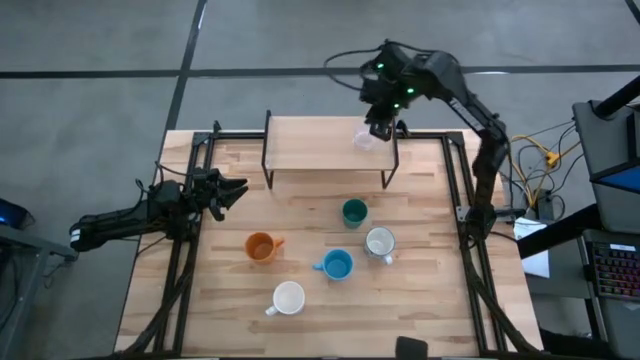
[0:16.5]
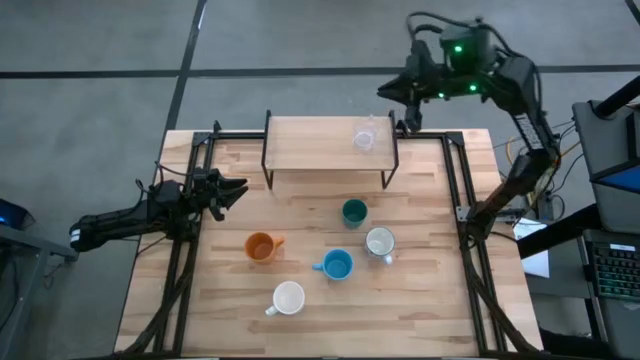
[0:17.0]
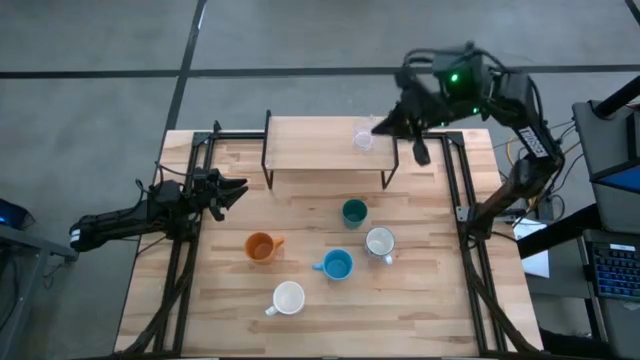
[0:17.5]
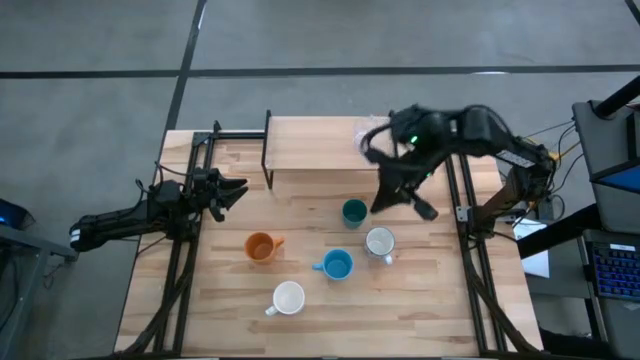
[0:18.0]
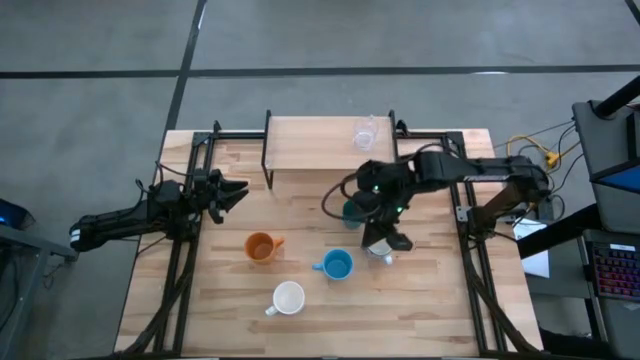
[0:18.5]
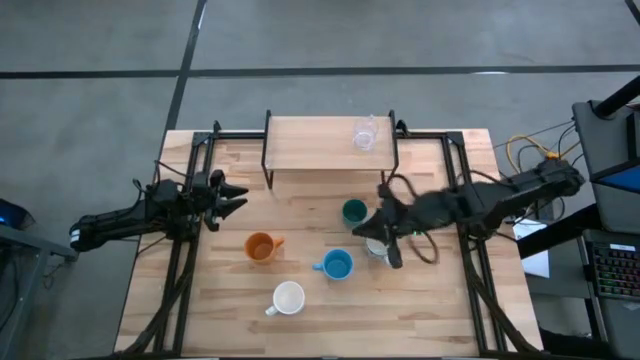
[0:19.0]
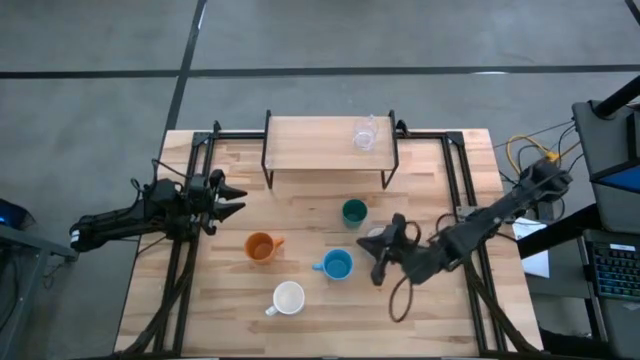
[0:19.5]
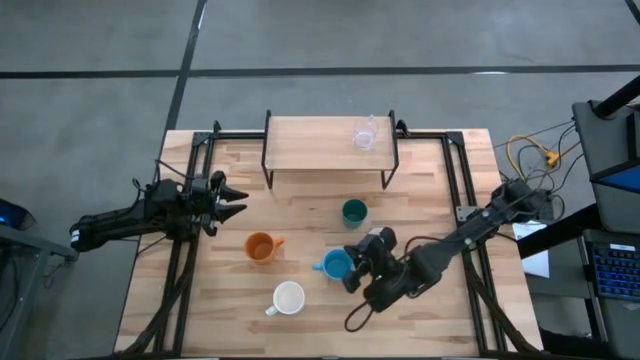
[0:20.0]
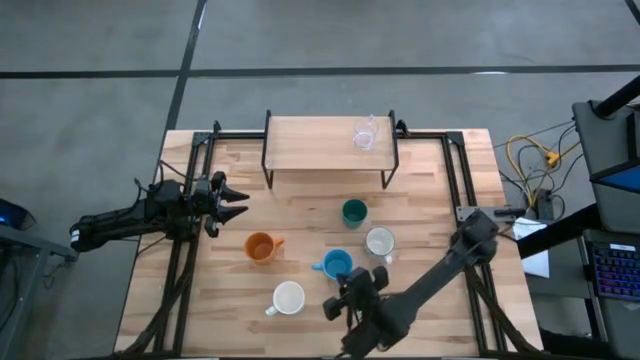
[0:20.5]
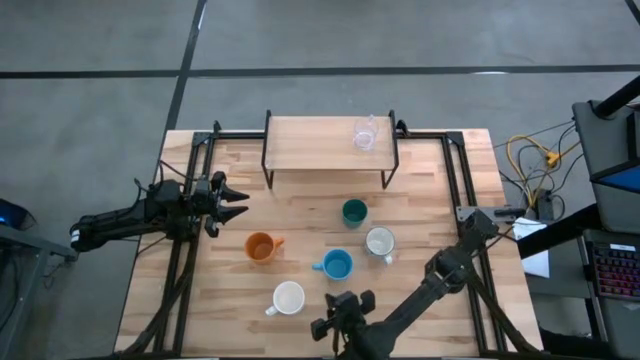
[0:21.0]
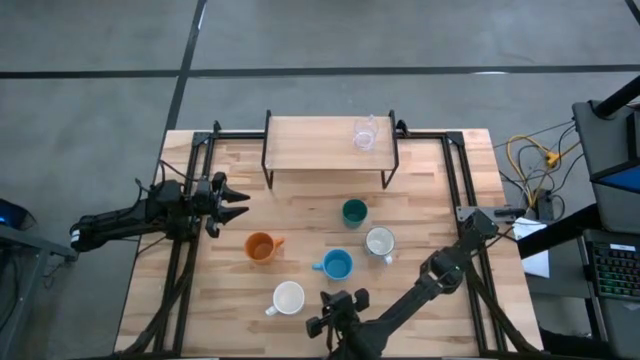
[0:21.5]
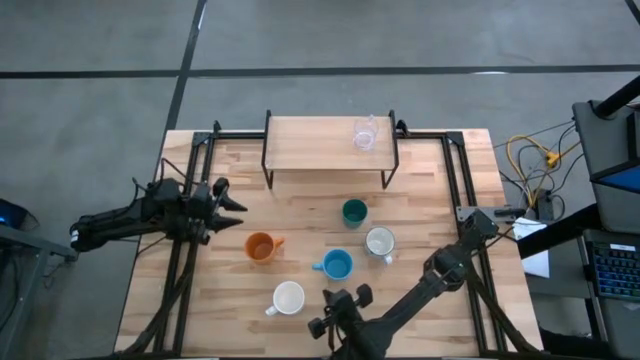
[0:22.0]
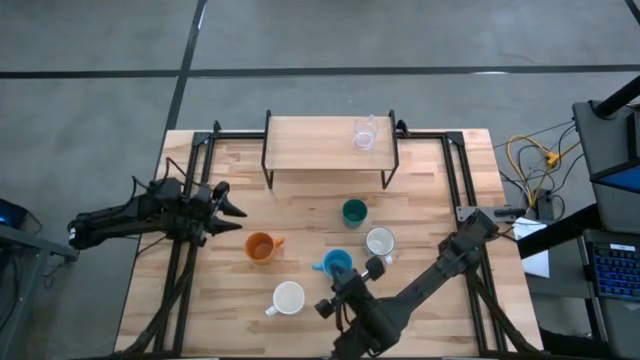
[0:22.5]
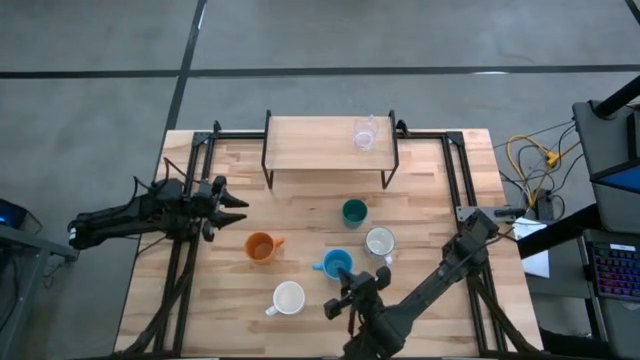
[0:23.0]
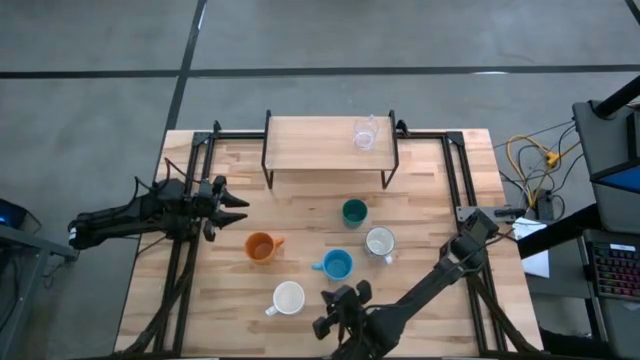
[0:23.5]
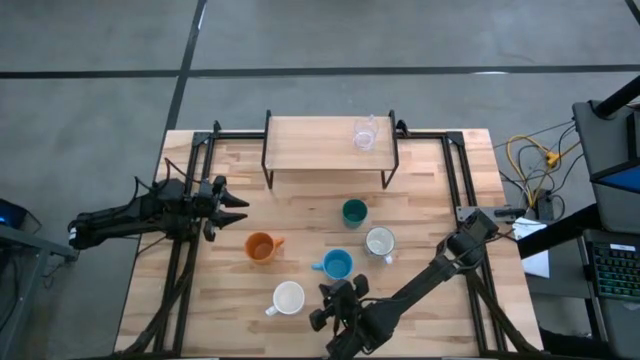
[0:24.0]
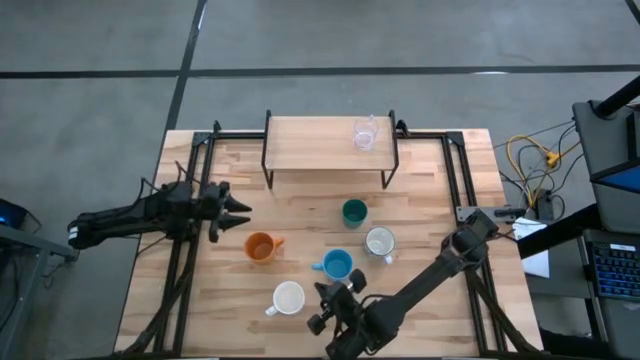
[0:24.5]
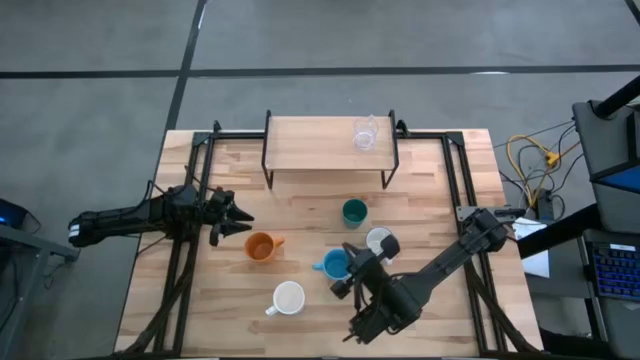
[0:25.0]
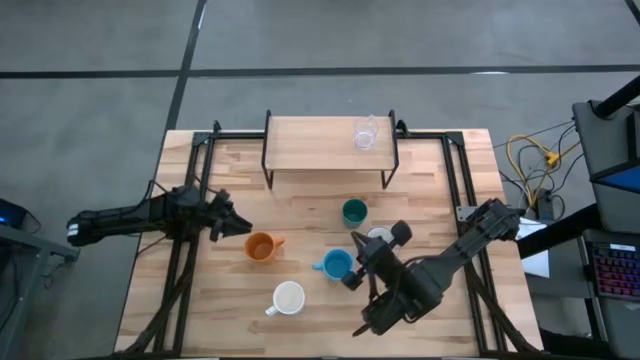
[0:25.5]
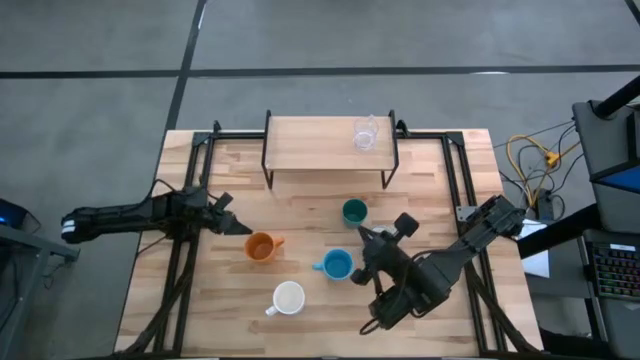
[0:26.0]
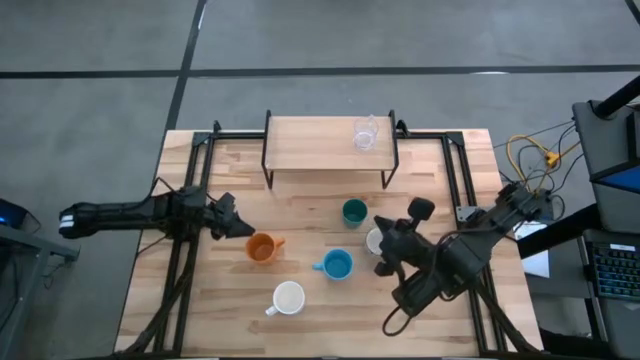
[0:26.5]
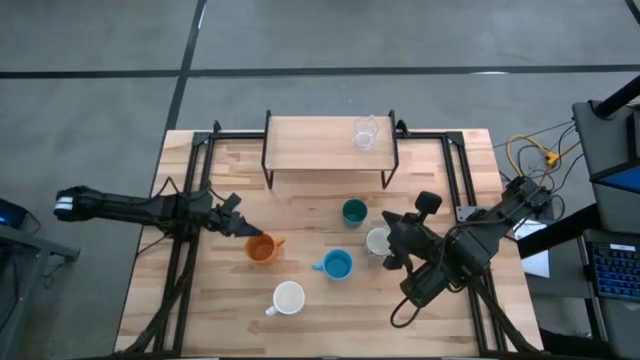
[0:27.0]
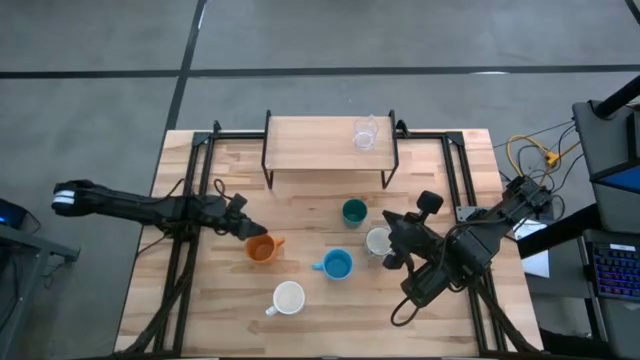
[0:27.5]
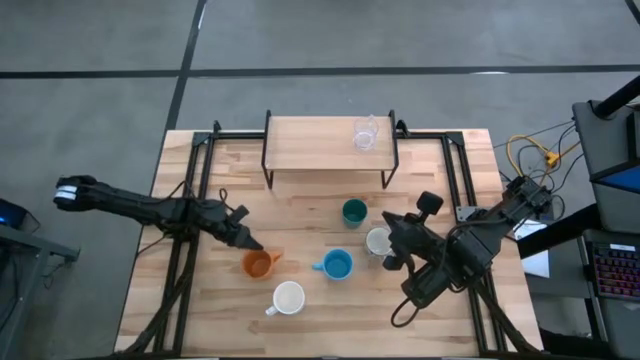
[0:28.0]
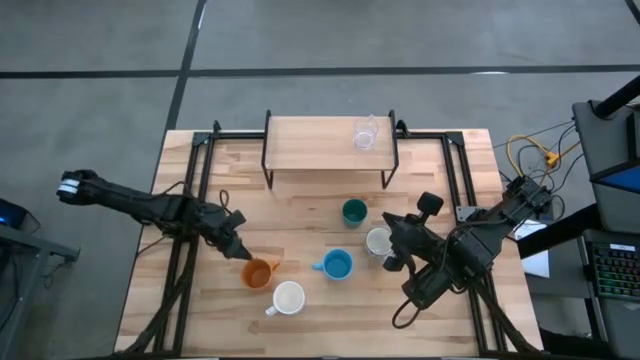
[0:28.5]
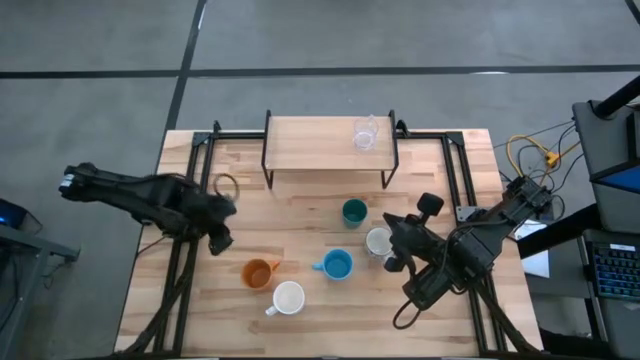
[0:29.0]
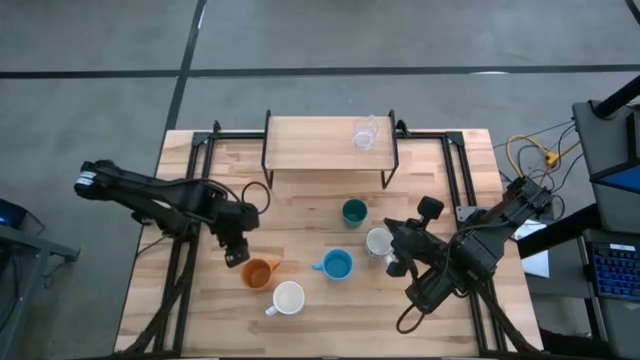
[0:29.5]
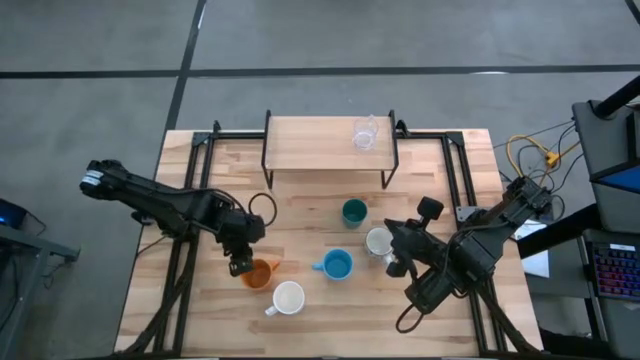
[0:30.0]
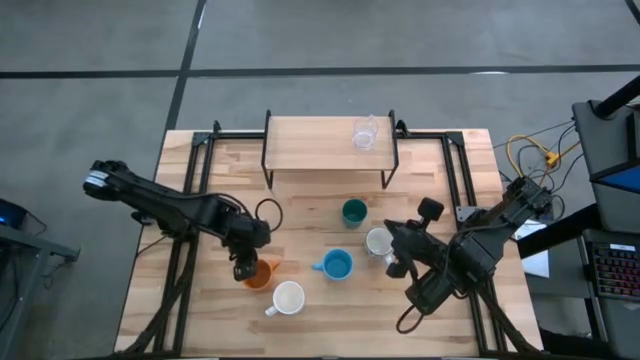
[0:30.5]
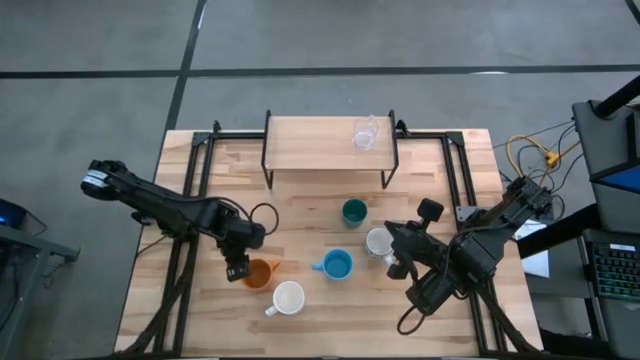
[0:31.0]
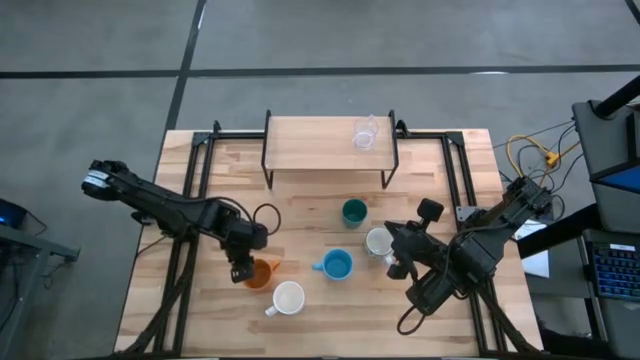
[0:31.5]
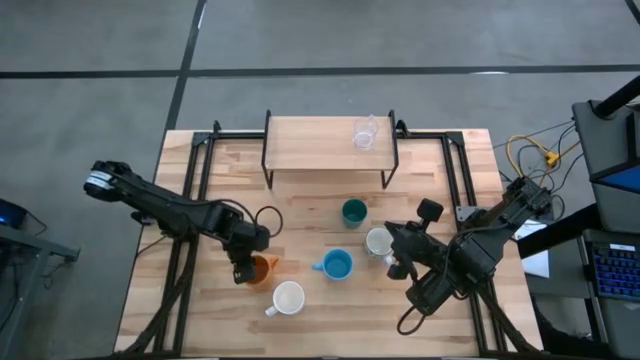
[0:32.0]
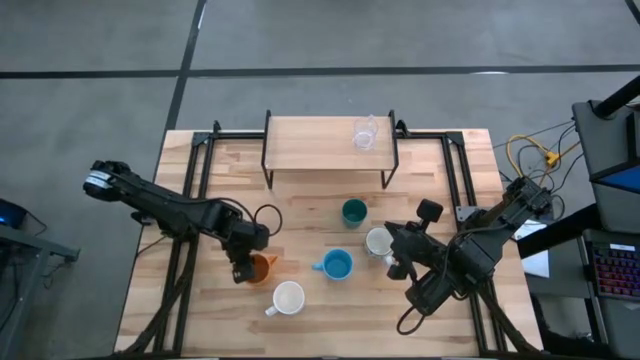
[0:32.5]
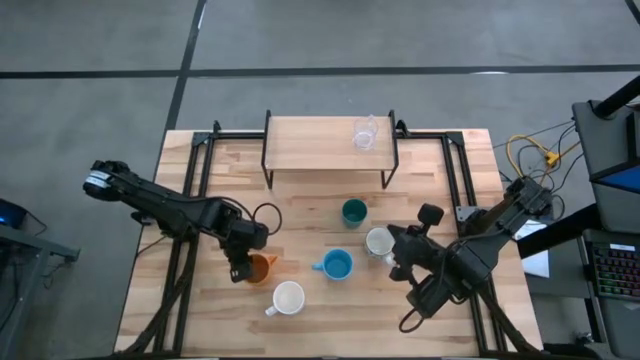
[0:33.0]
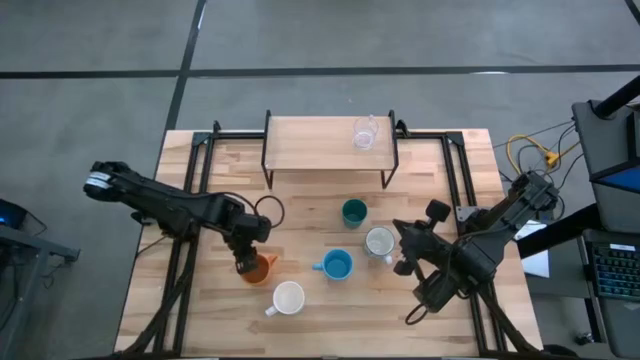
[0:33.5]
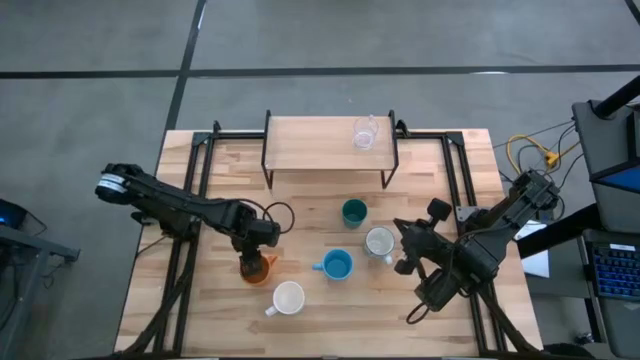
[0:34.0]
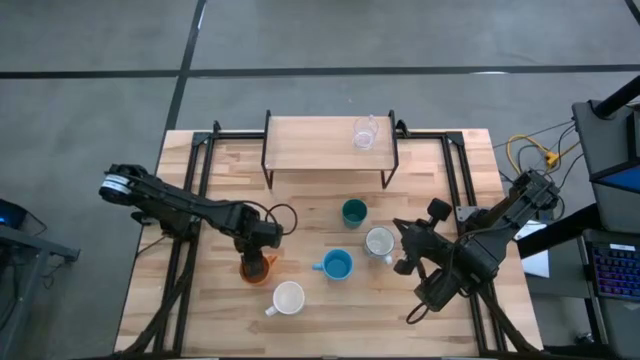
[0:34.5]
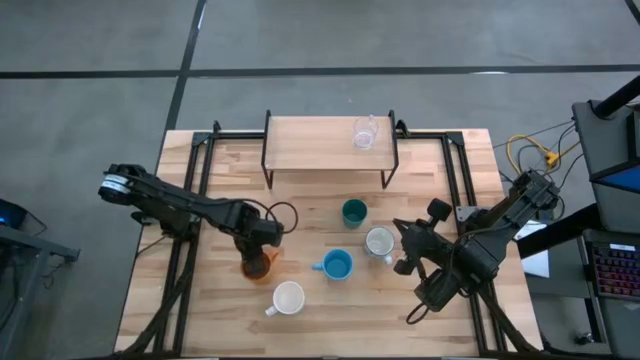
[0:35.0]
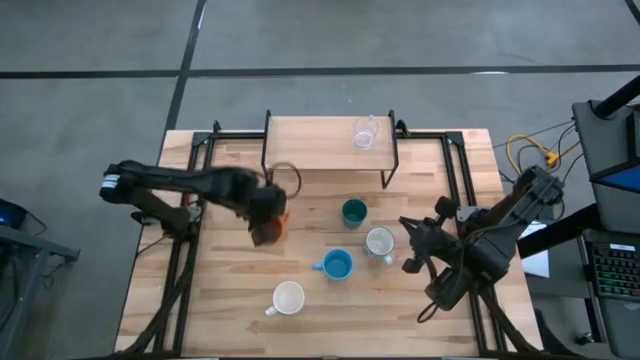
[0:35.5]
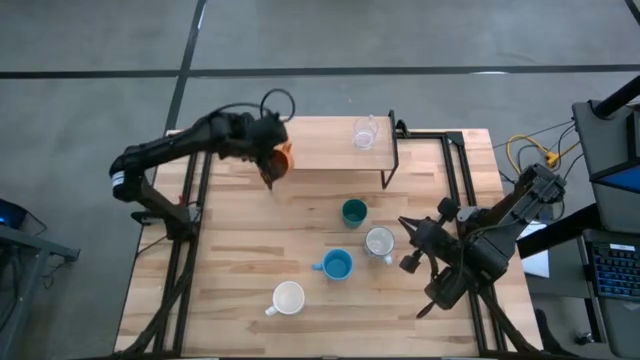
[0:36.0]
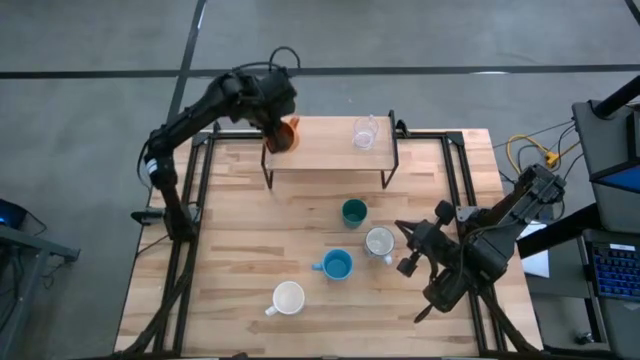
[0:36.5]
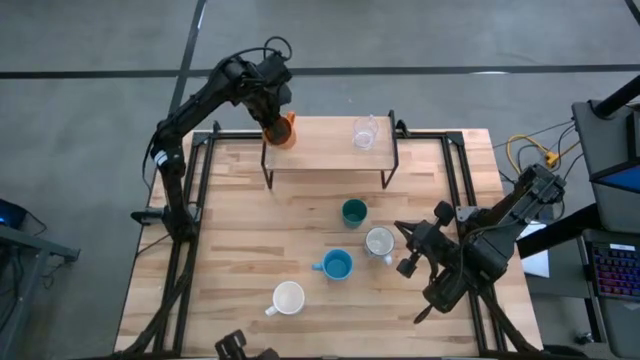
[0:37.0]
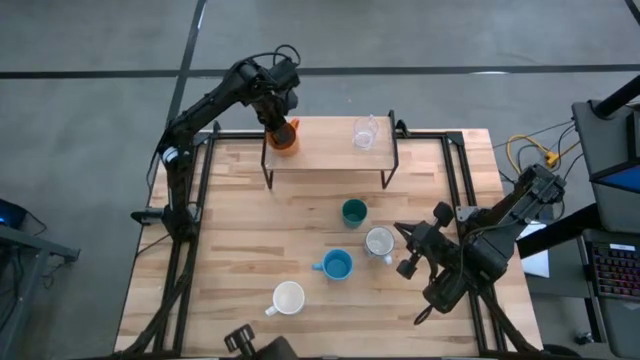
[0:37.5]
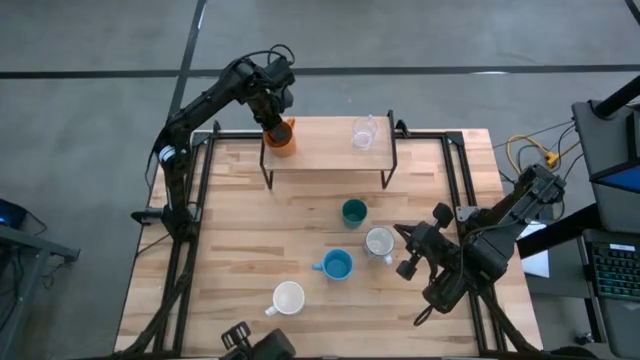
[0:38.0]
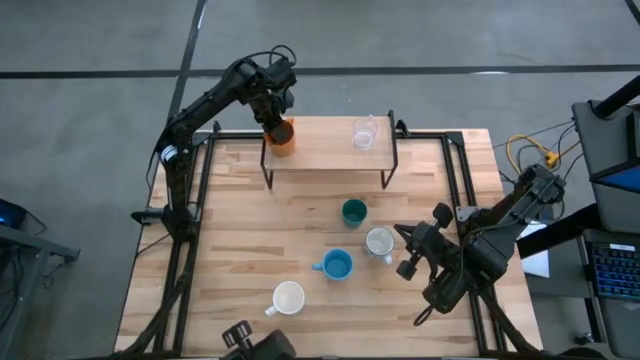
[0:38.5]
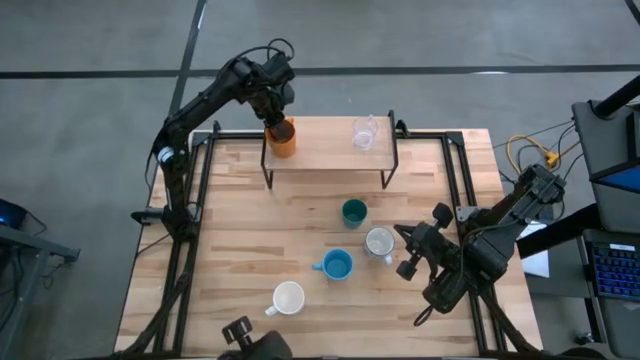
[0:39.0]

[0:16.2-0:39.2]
Task: Stack small to large cups/mugs on shelf
Put the orange mug on the shelf
